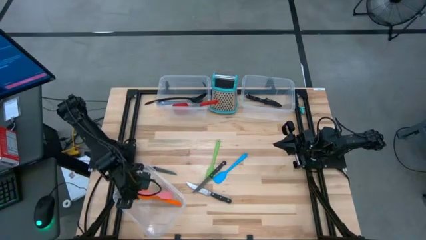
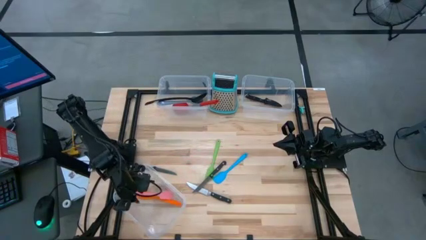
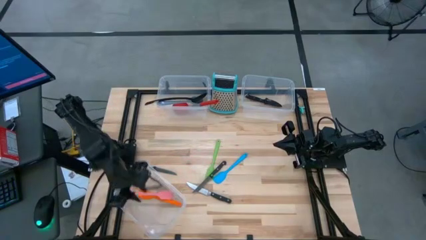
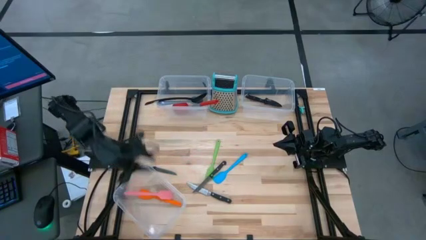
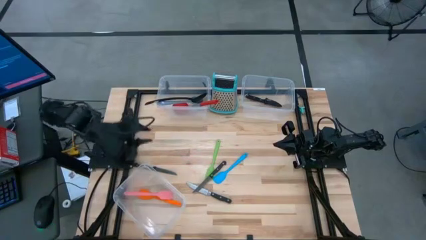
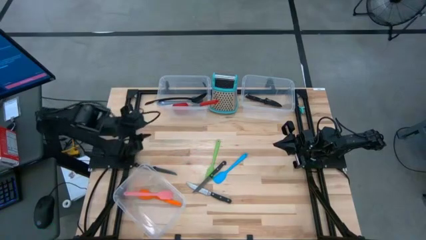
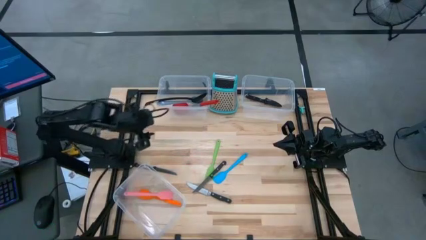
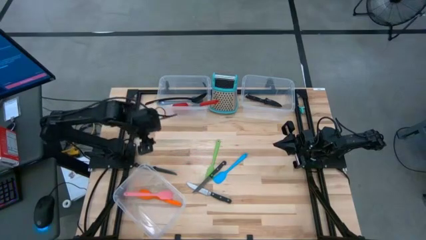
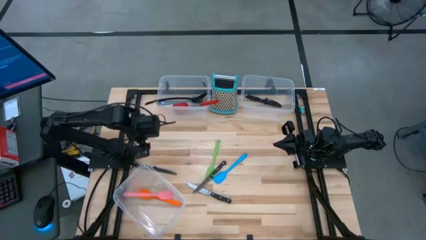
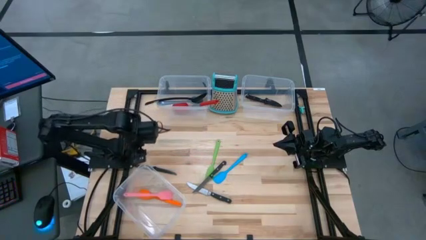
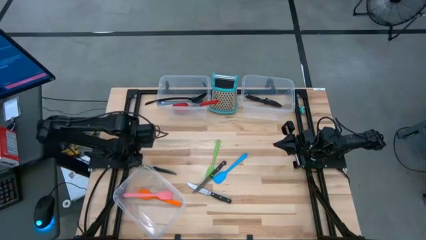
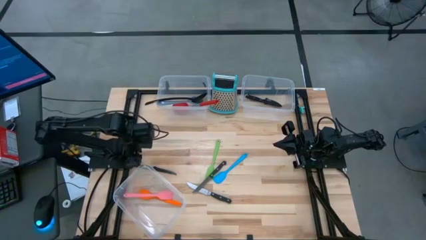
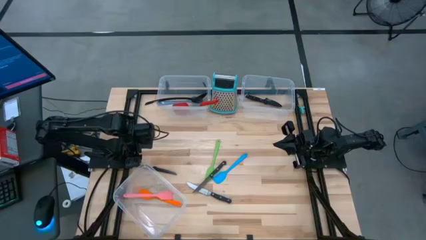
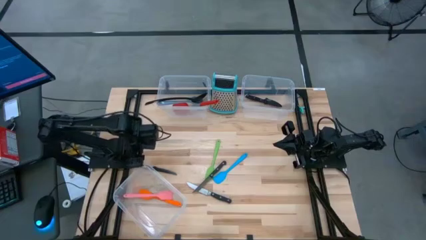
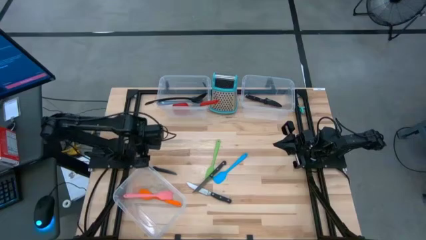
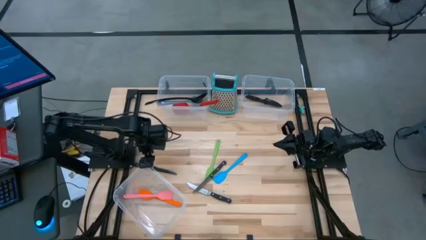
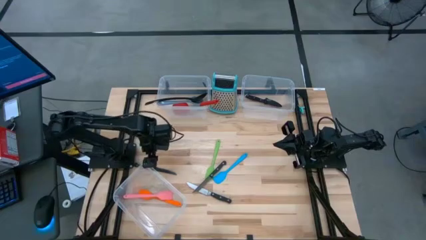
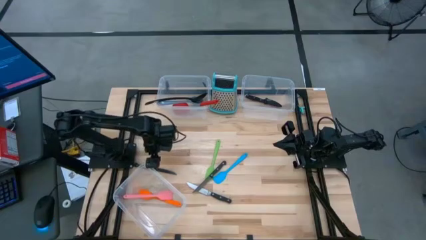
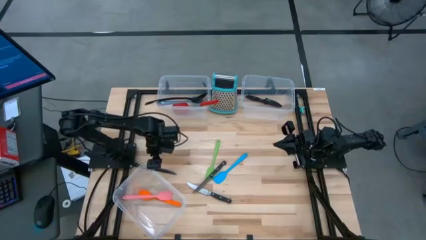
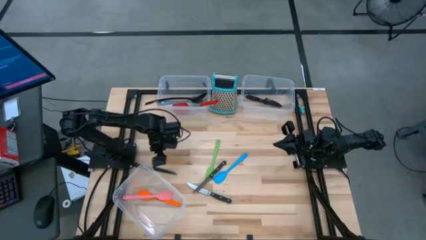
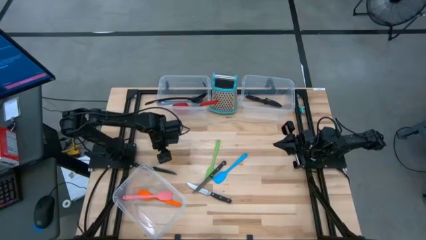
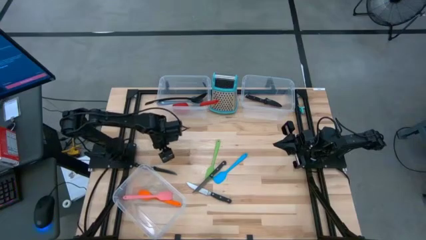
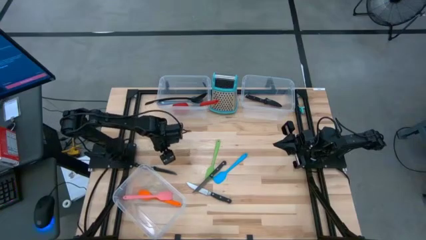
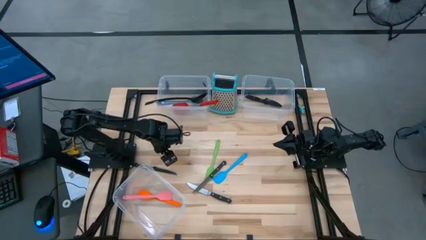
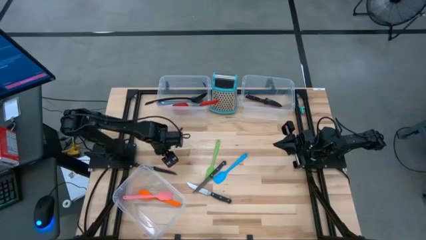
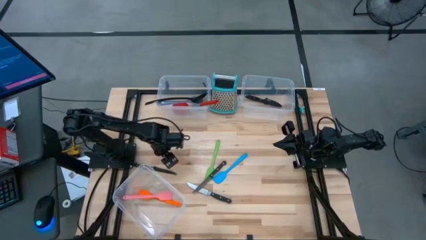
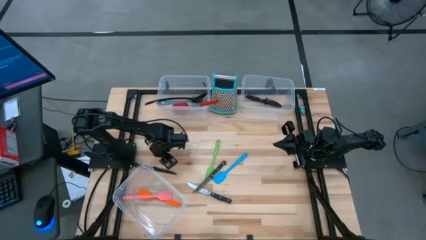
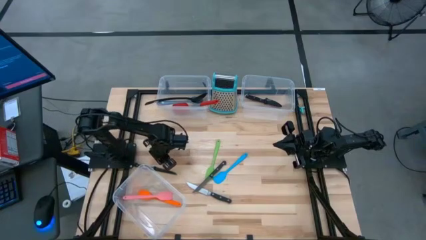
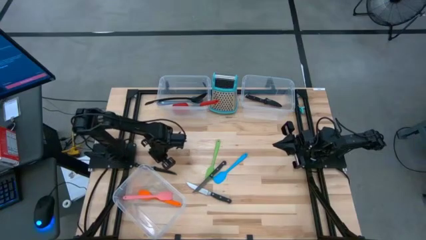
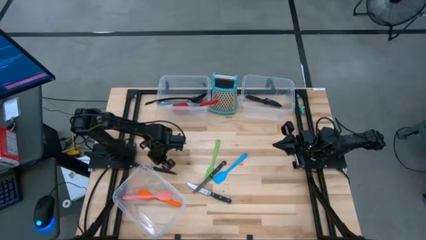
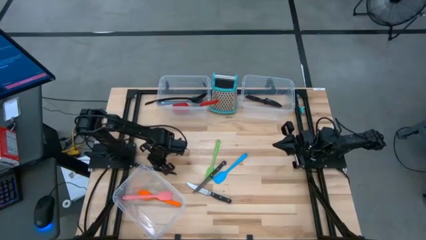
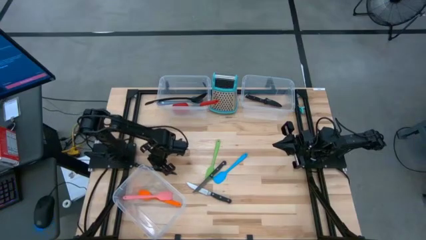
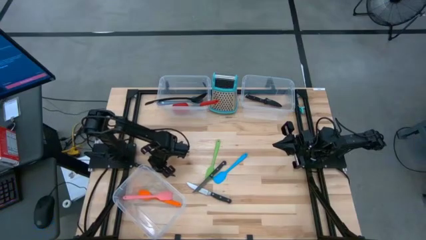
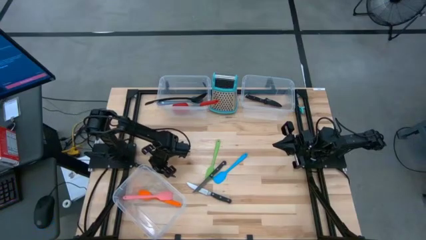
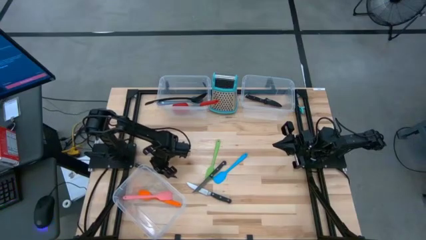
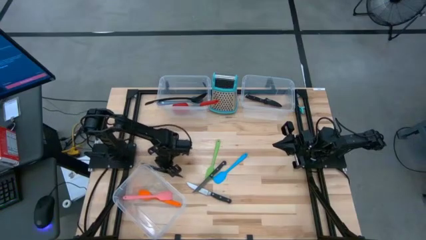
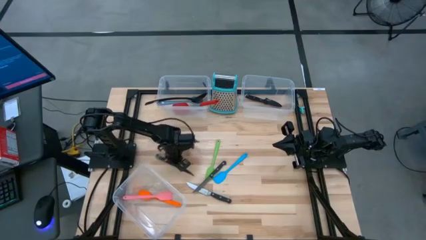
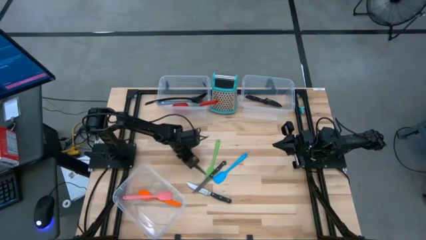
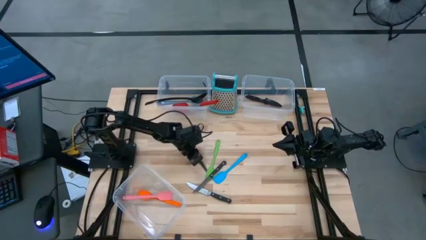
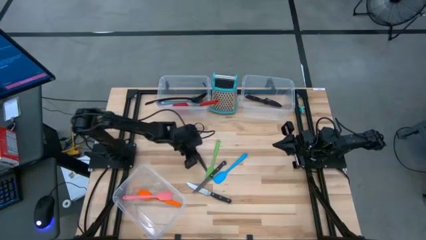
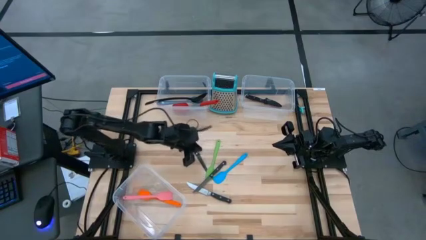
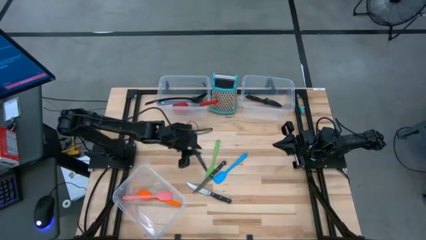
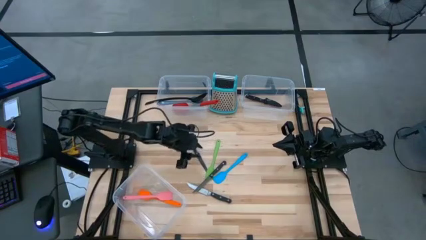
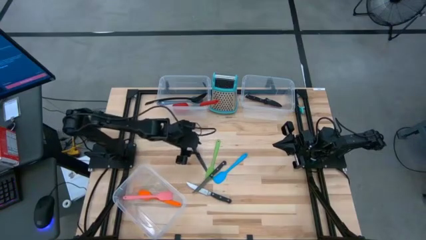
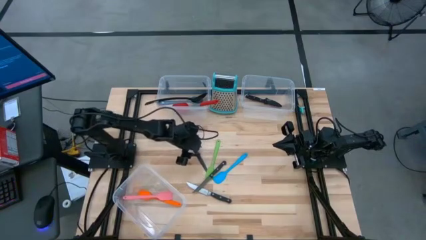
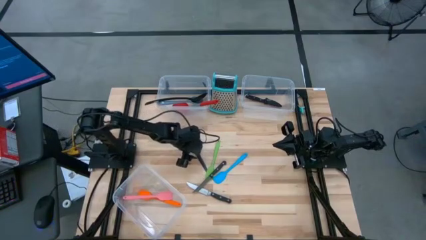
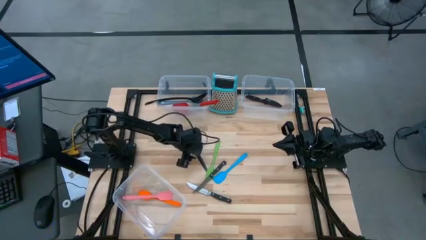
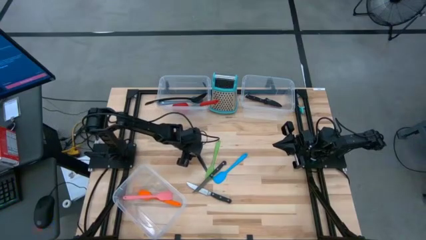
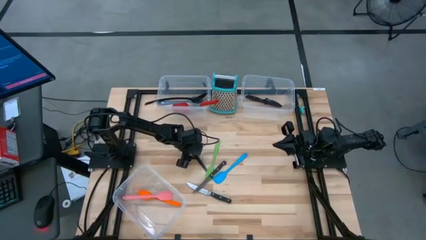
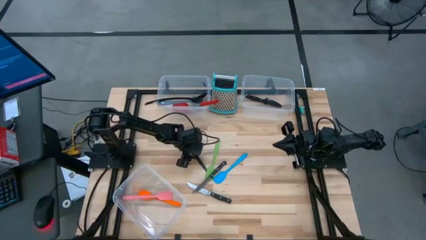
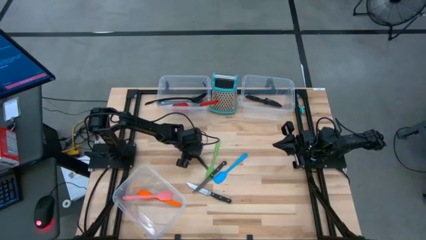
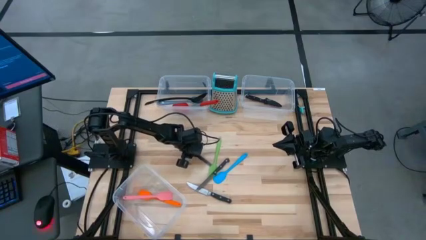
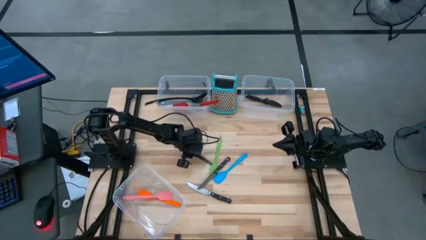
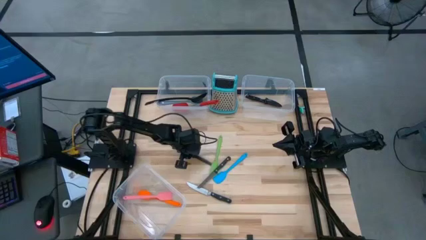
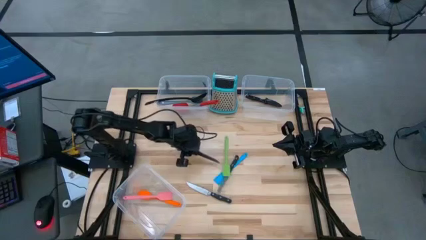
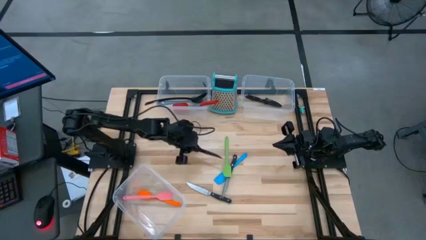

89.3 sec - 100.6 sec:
Task: Pick & Place Kitchen Items
Put the black knife into the top right transparent bin
